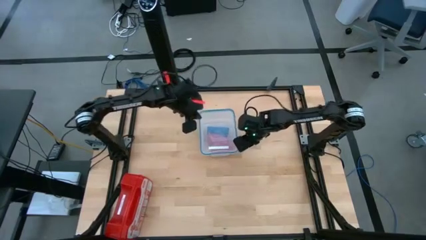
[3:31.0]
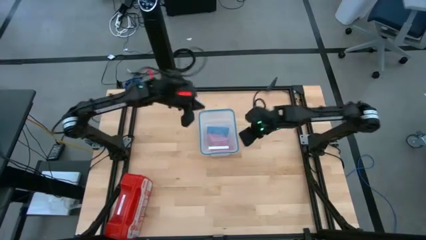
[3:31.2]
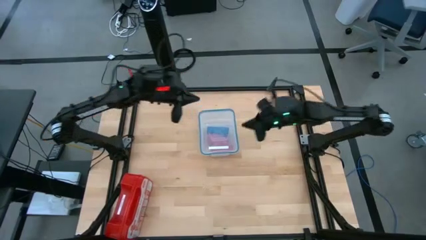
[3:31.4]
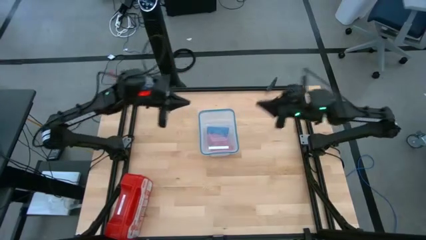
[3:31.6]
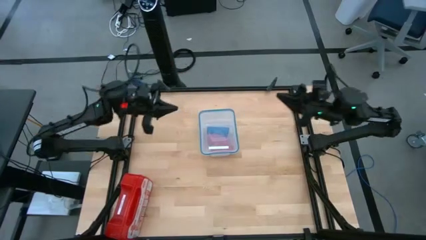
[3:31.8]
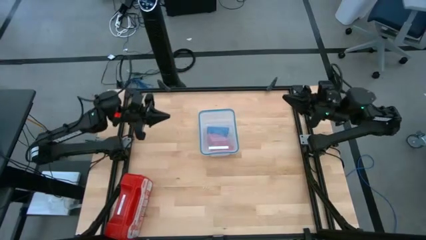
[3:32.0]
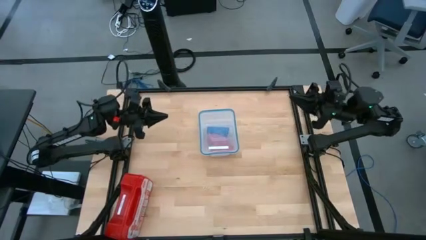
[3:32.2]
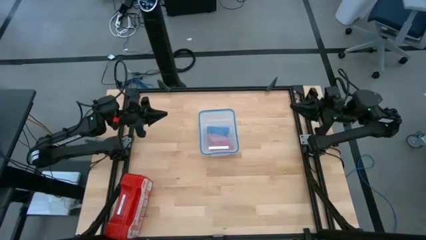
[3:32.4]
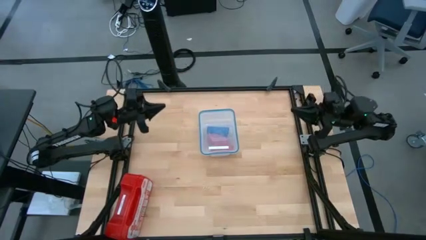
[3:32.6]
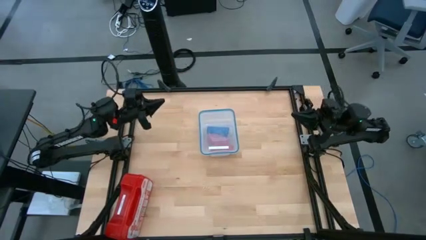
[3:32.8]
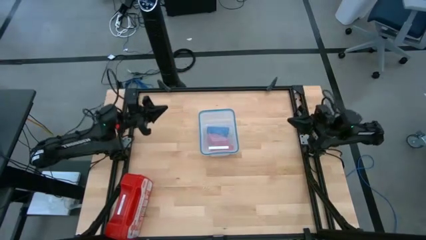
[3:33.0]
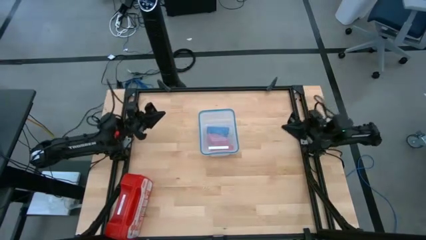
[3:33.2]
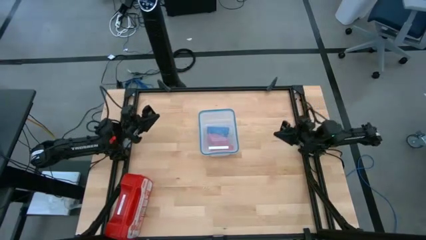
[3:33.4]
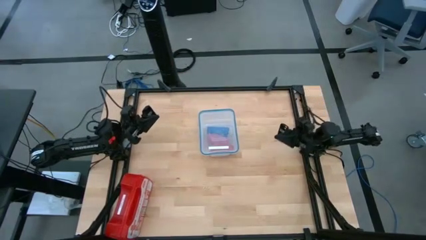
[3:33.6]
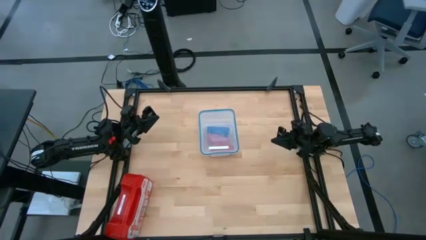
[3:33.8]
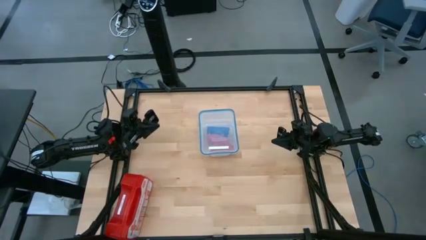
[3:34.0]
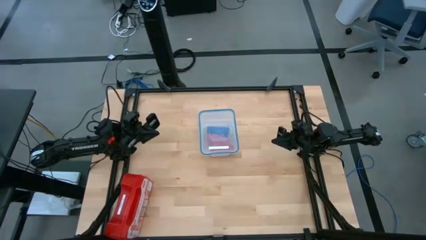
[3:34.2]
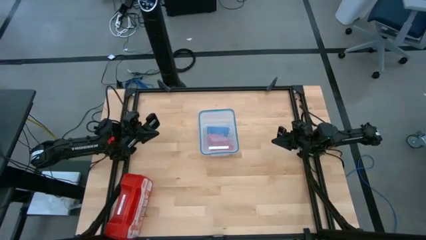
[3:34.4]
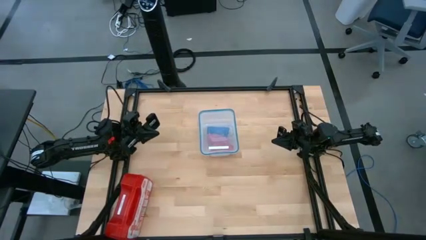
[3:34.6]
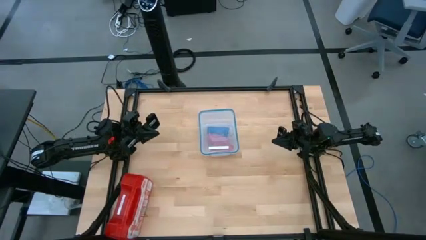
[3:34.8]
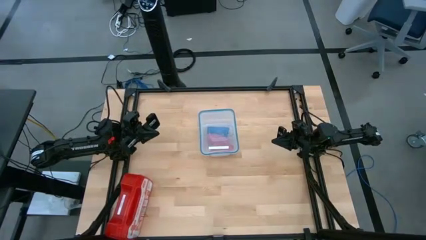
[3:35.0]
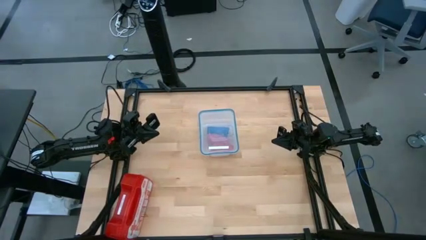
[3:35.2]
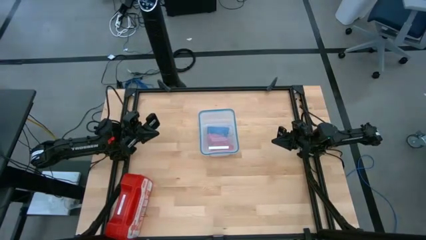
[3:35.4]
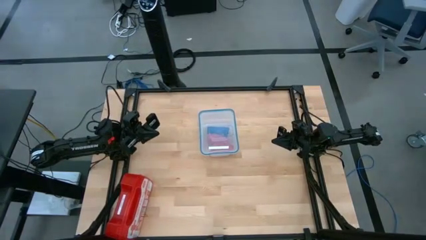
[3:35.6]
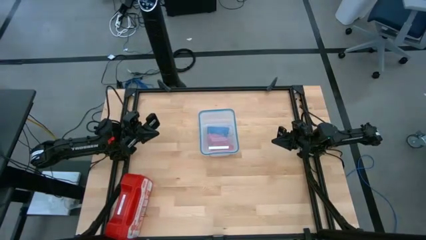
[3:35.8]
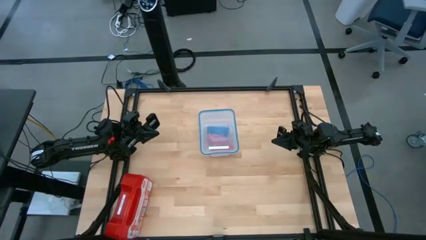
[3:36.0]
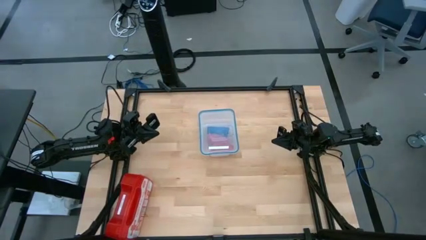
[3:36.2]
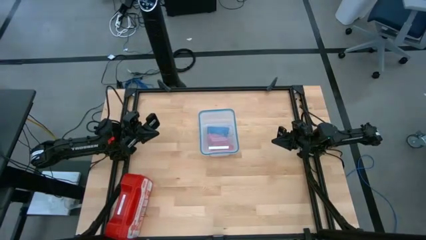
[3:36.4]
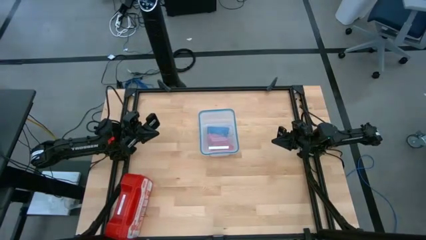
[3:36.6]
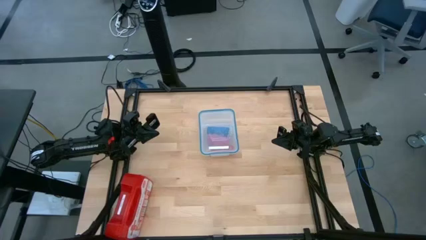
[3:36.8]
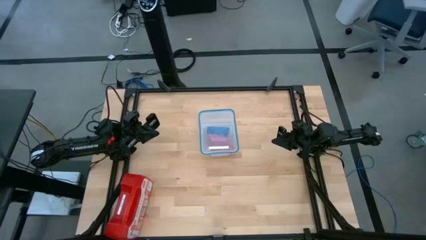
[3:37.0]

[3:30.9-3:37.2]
Task: Roll bandage
Return to Home Position

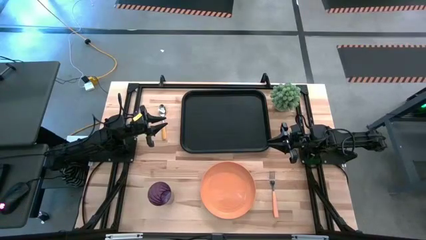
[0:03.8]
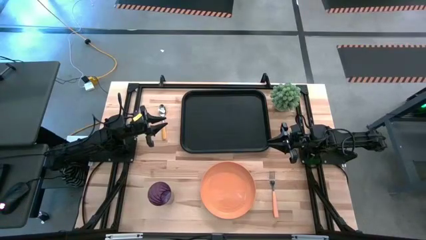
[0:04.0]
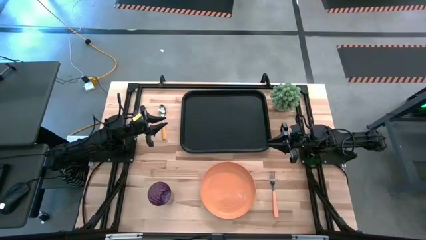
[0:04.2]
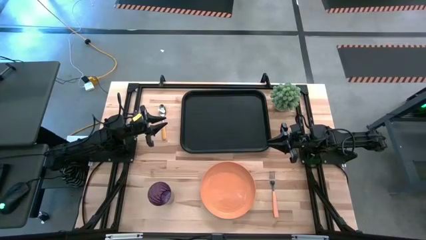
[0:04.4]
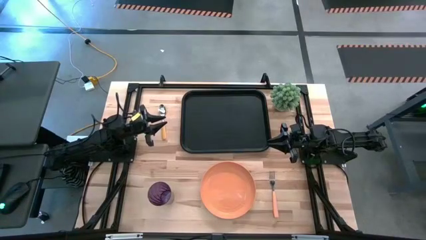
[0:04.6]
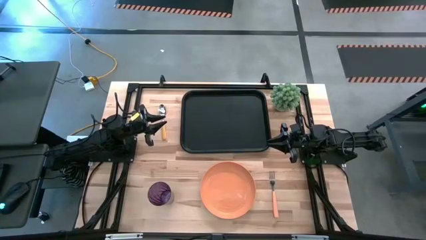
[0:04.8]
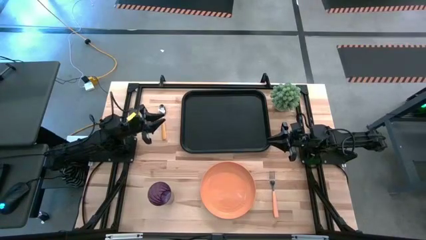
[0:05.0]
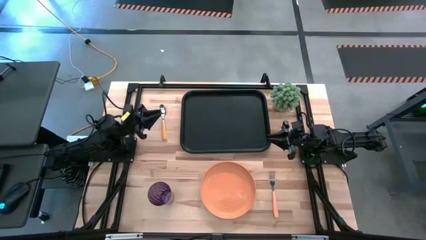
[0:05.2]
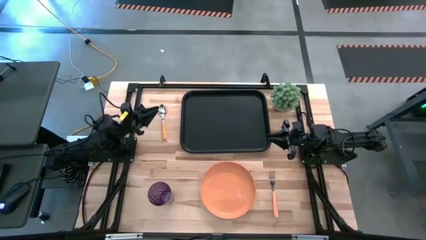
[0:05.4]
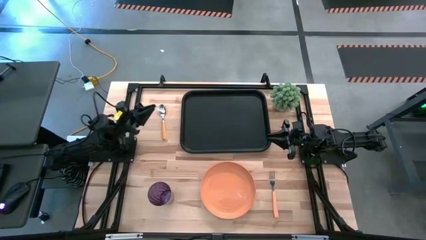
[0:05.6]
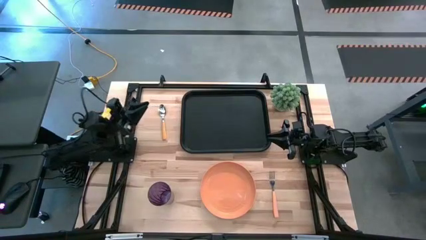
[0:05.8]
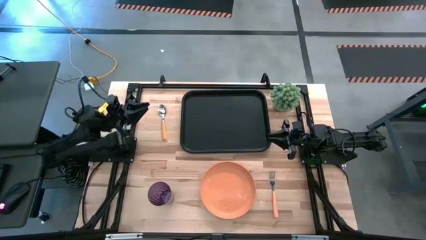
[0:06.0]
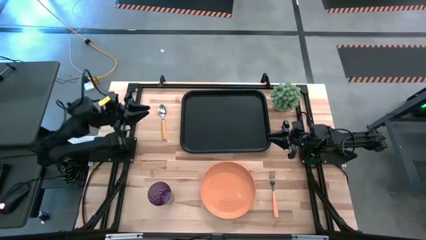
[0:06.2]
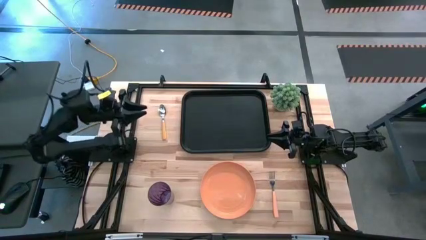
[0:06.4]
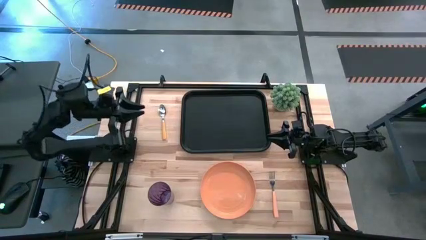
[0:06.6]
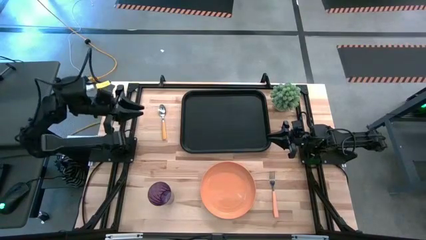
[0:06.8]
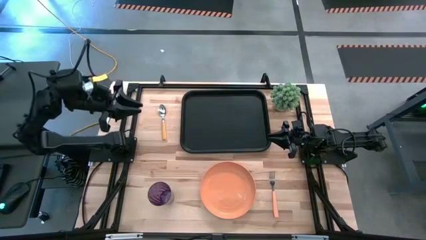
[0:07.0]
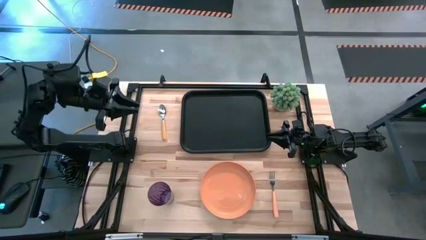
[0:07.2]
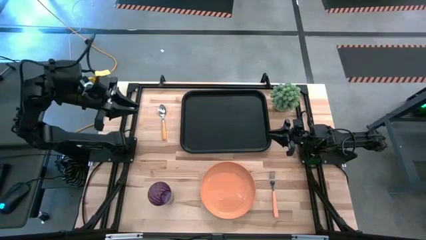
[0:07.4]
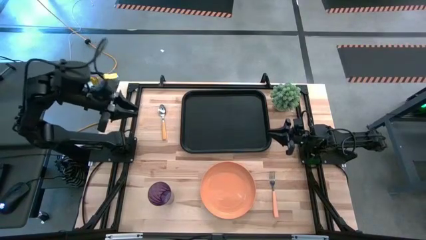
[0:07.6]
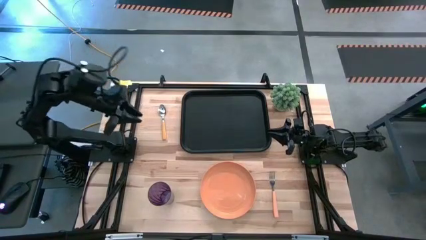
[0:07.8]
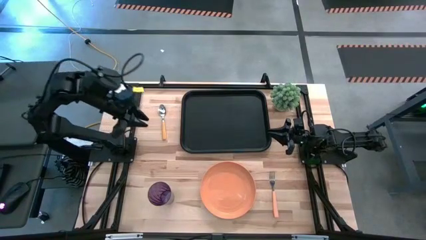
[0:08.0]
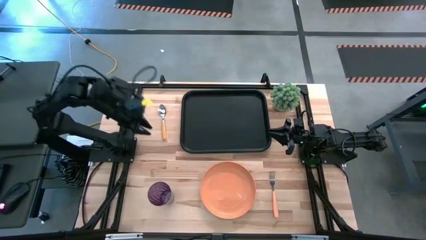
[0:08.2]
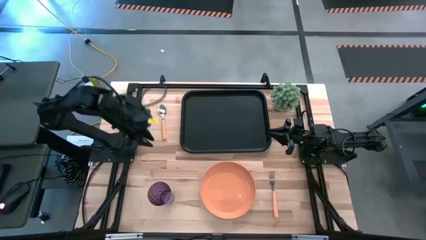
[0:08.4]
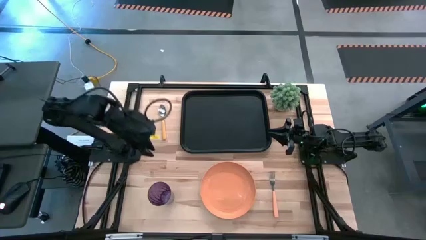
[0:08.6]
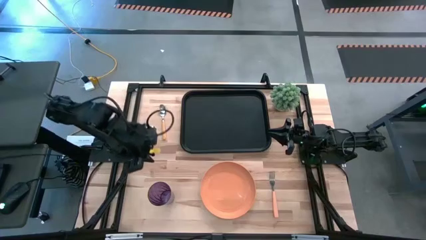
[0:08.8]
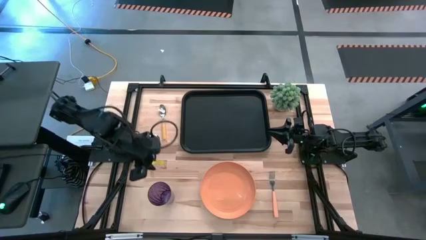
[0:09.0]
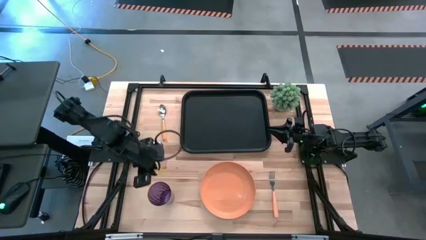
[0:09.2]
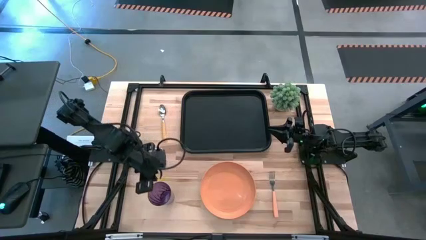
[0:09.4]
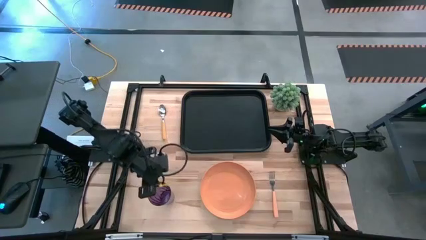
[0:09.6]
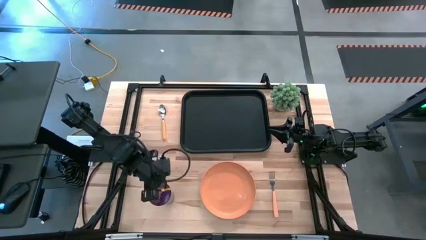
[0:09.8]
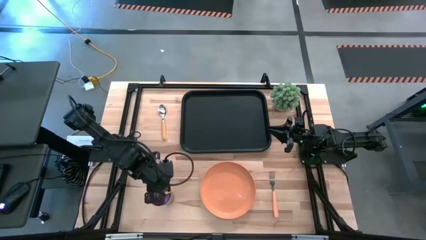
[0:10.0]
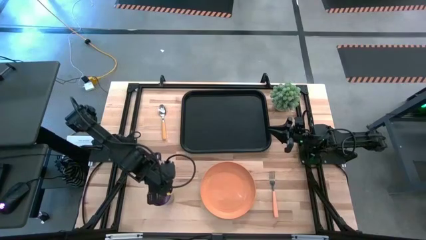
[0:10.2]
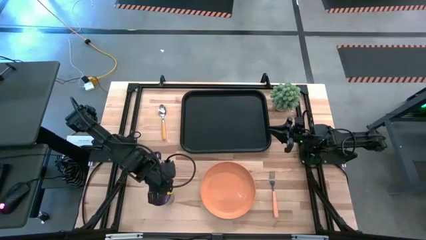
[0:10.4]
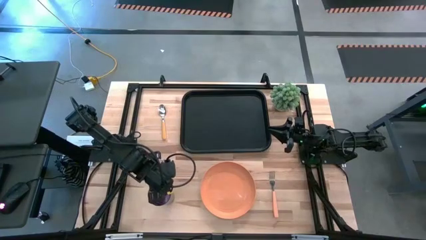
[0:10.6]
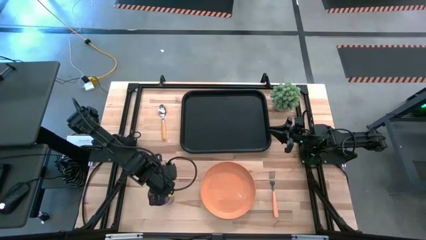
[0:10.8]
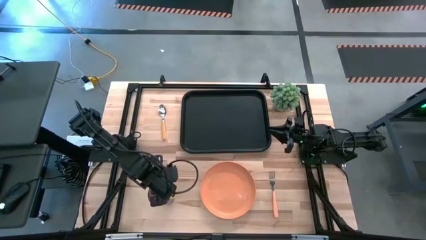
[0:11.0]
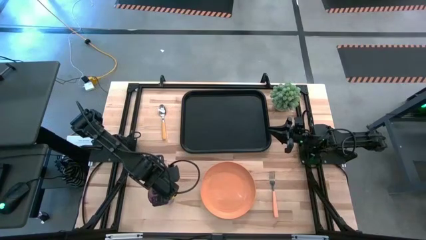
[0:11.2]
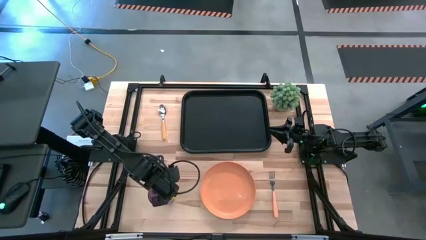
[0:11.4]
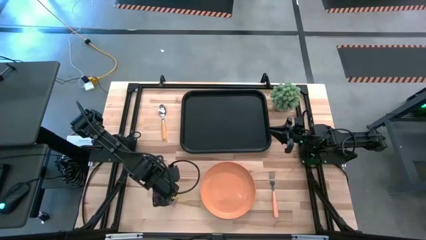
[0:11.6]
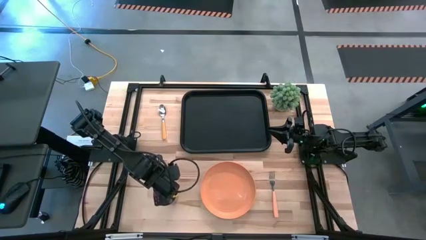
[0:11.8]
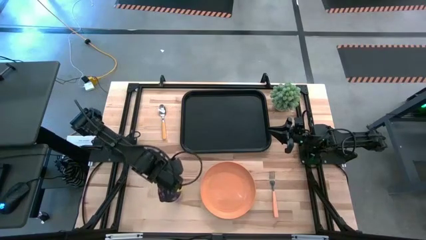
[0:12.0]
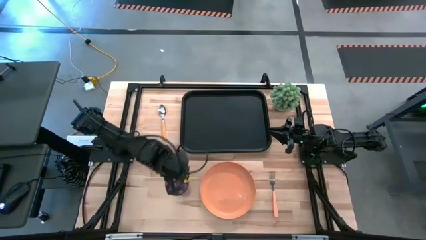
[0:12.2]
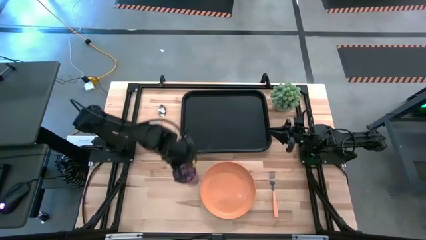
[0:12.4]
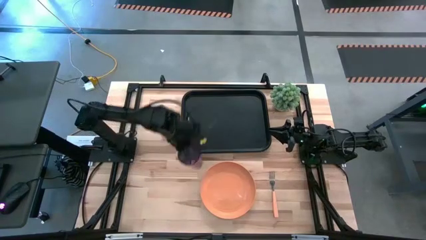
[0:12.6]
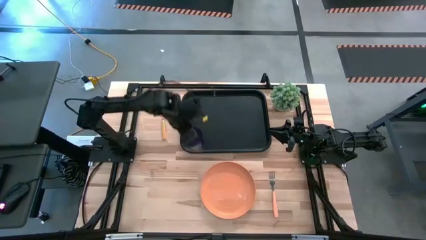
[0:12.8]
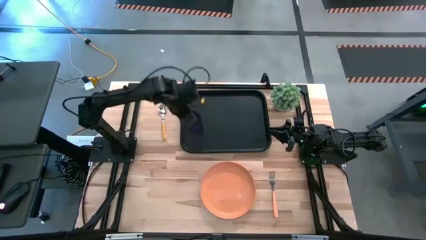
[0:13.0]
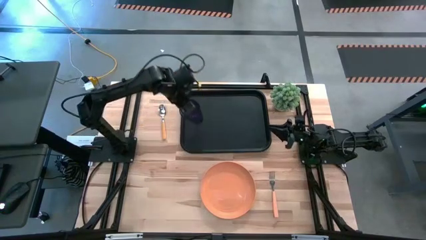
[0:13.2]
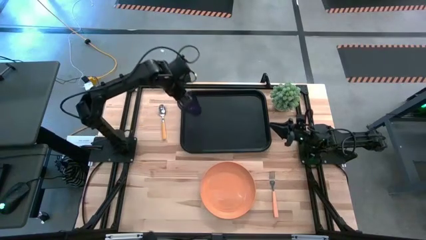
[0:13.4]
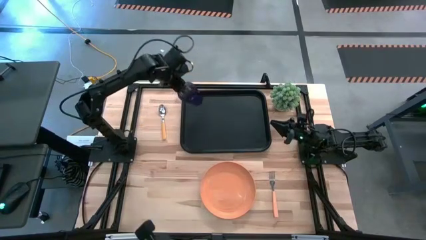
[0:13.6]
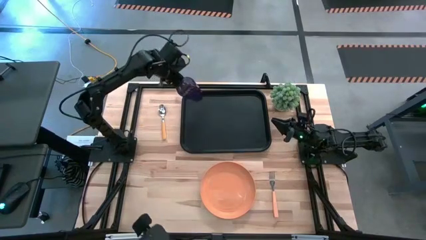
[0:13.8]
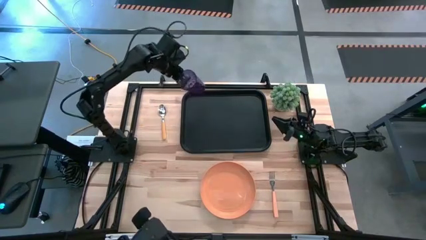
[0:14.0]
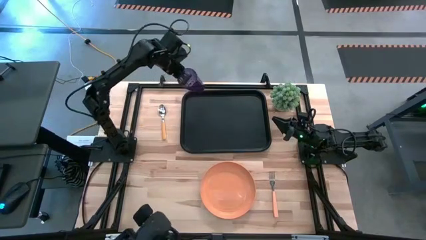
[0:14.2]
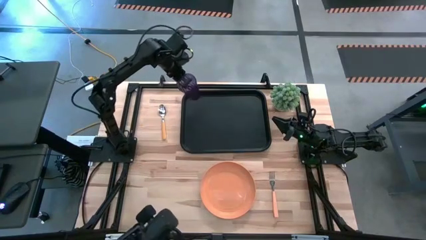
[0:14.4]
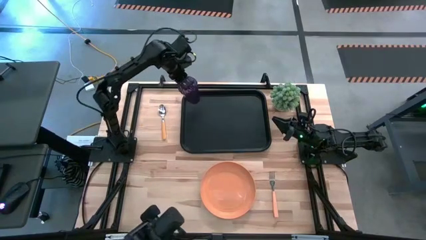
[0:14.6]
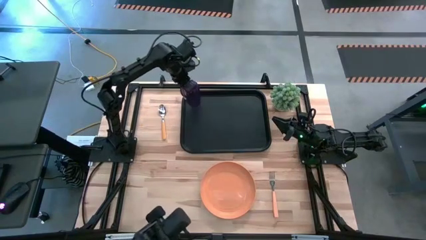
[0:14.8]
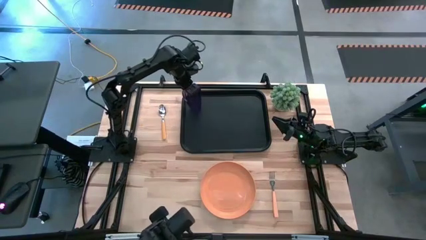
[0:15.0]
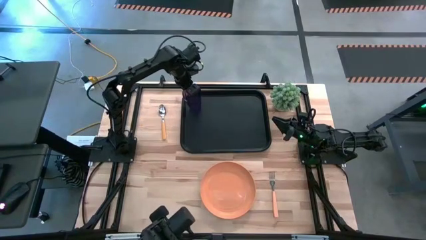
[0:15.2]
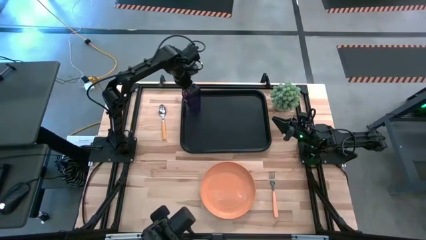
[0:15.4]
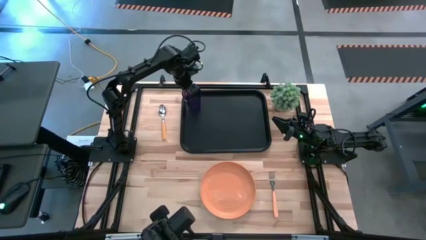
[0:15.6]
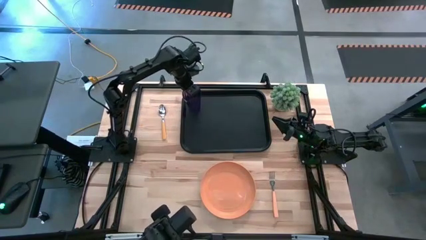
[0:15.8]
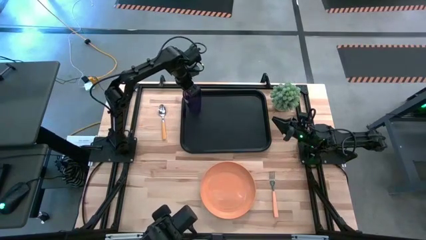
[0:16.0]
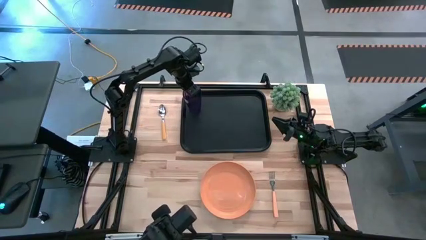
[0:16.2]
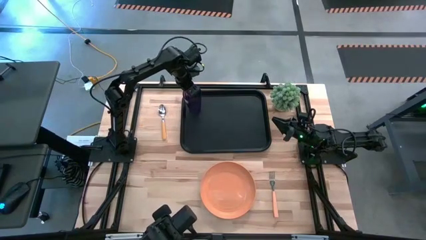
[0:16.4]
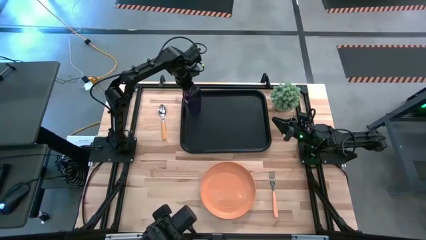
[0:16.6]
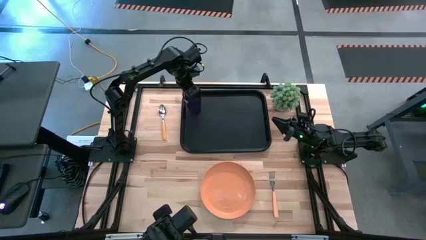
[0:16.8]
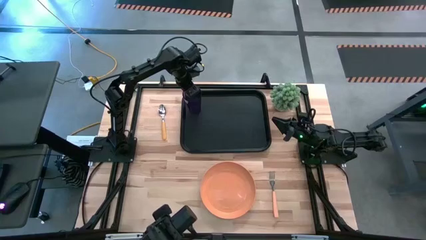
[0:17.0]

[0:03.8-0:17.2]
Task: Pick and place plate/cup/fork/spoon on tray
Put the purple cup on the black serving tray
